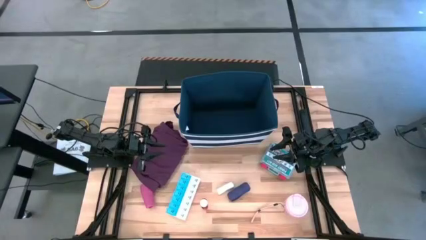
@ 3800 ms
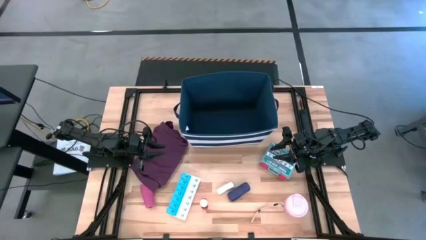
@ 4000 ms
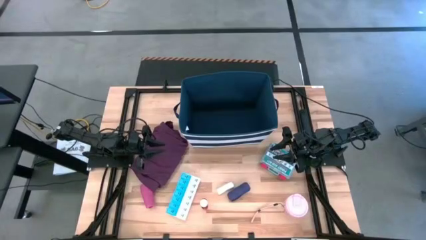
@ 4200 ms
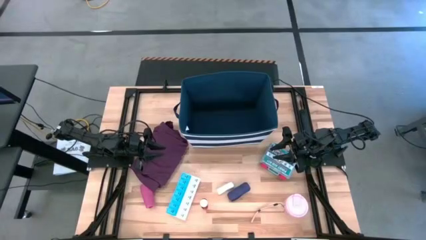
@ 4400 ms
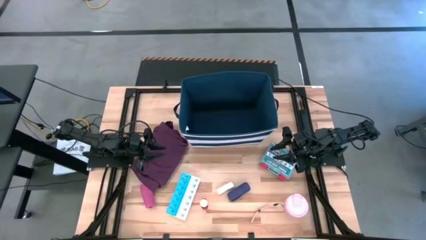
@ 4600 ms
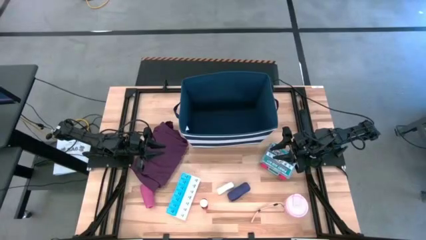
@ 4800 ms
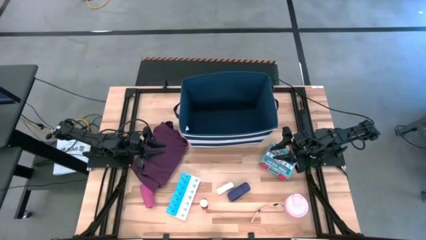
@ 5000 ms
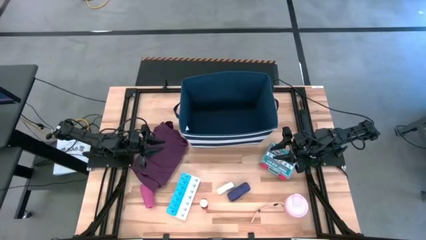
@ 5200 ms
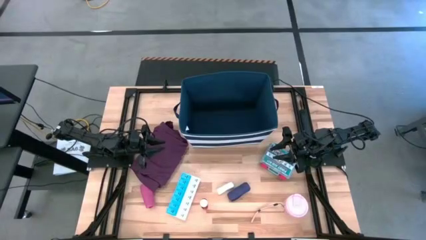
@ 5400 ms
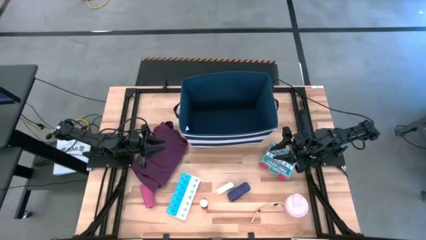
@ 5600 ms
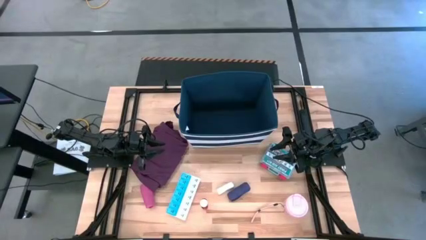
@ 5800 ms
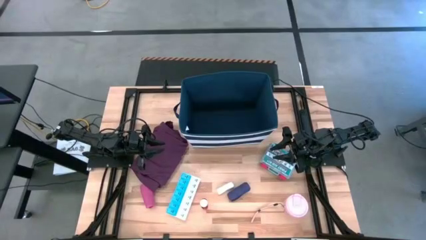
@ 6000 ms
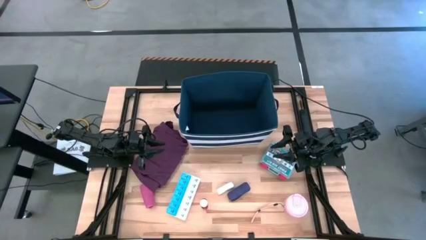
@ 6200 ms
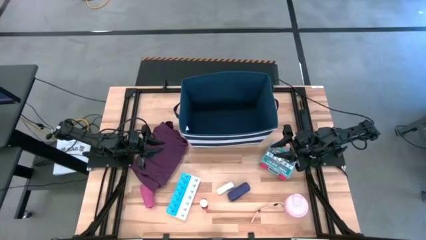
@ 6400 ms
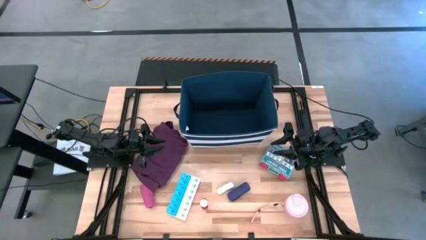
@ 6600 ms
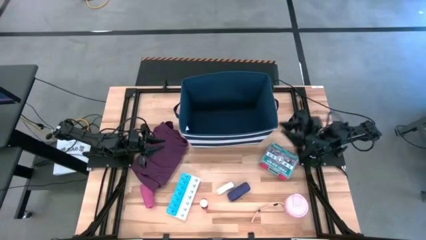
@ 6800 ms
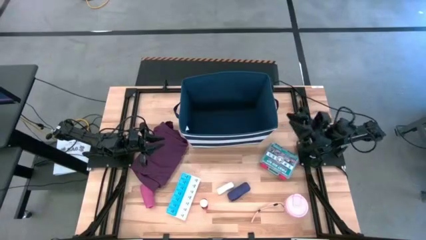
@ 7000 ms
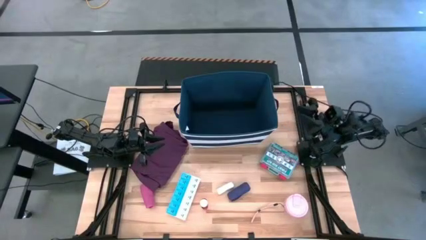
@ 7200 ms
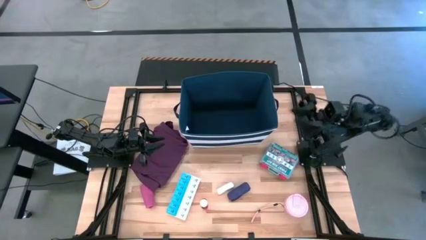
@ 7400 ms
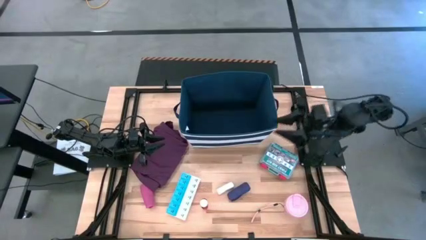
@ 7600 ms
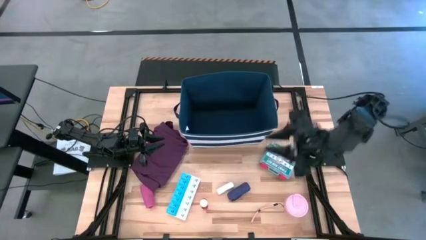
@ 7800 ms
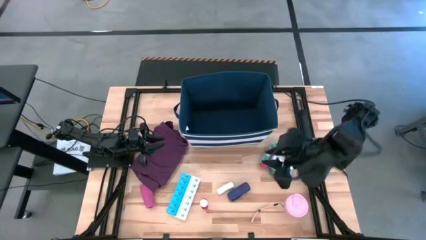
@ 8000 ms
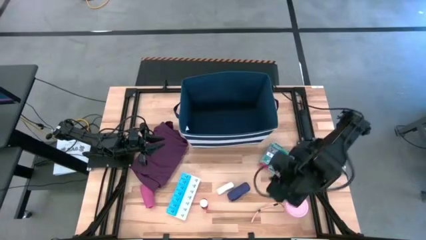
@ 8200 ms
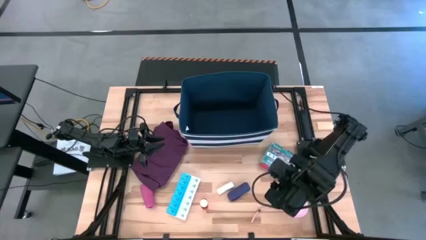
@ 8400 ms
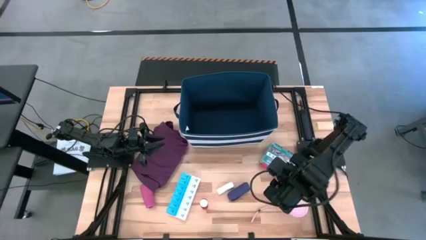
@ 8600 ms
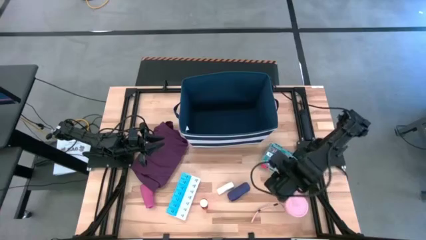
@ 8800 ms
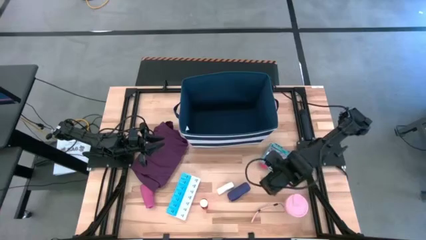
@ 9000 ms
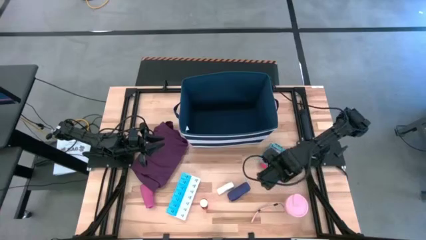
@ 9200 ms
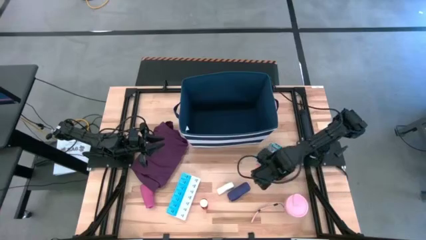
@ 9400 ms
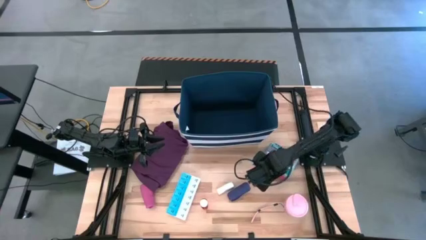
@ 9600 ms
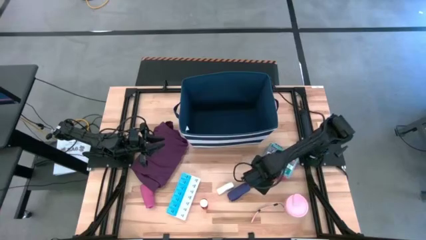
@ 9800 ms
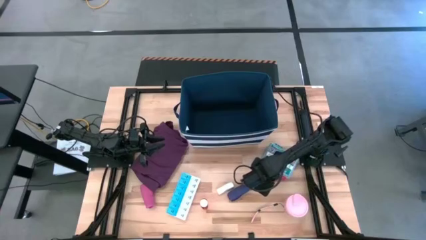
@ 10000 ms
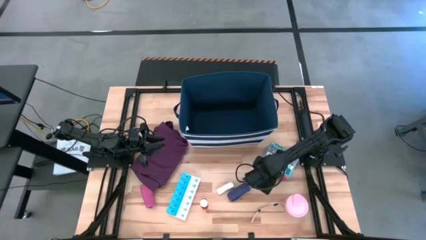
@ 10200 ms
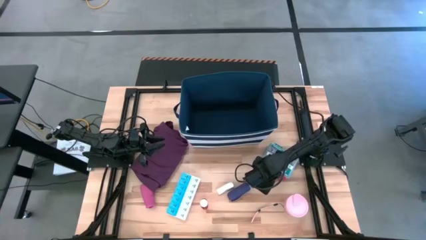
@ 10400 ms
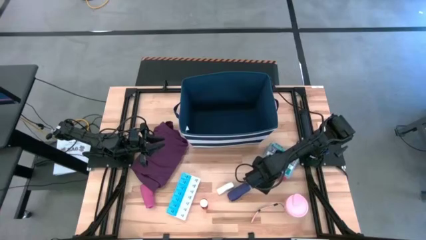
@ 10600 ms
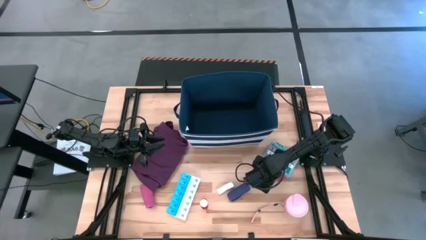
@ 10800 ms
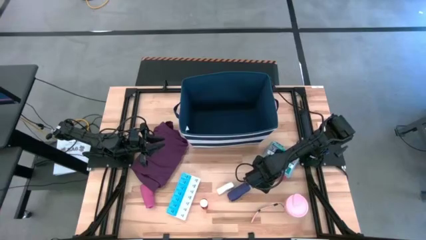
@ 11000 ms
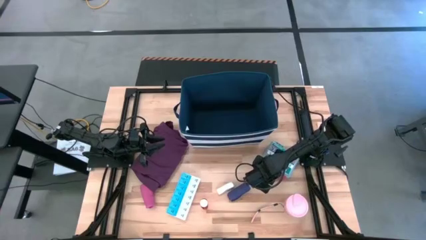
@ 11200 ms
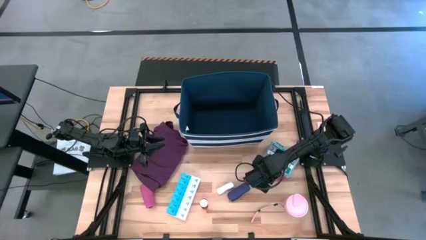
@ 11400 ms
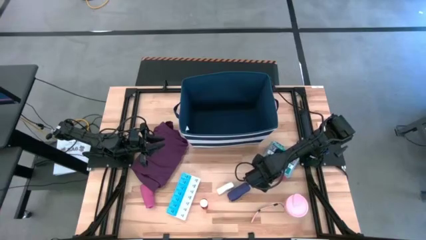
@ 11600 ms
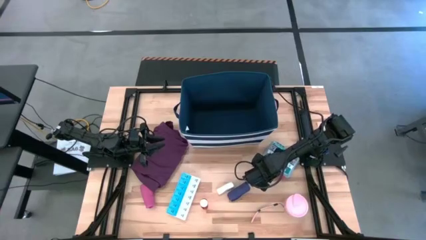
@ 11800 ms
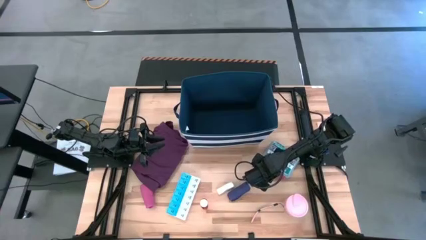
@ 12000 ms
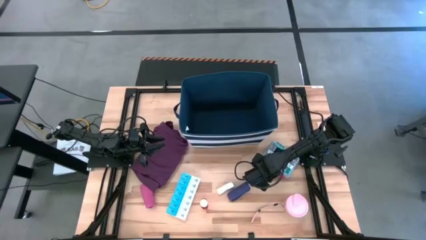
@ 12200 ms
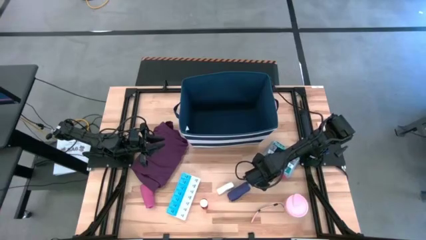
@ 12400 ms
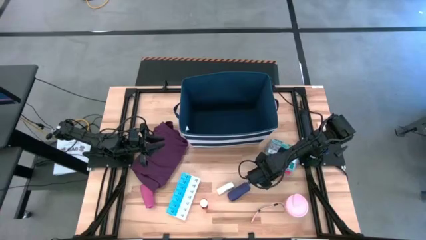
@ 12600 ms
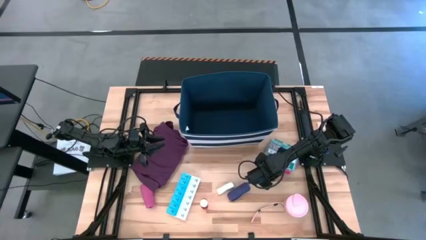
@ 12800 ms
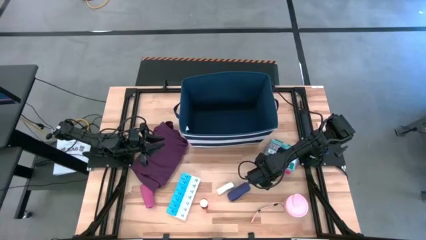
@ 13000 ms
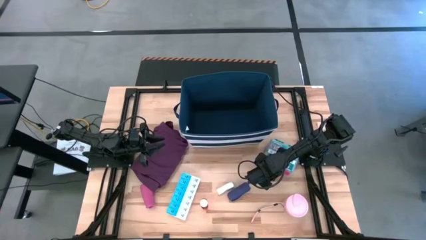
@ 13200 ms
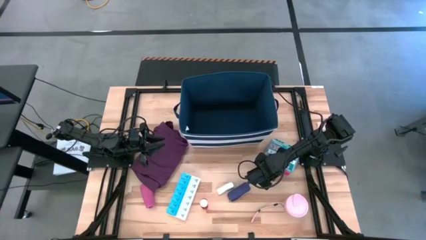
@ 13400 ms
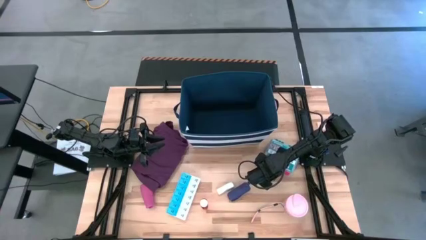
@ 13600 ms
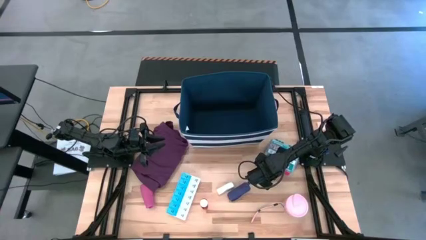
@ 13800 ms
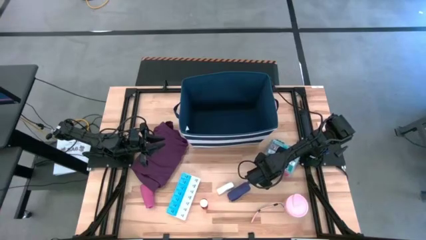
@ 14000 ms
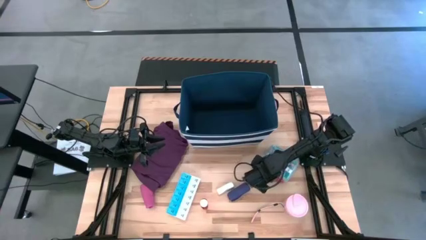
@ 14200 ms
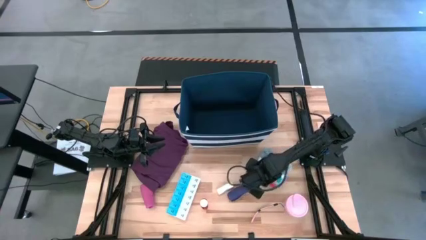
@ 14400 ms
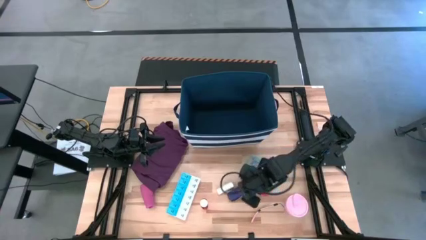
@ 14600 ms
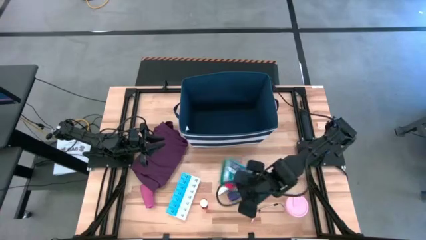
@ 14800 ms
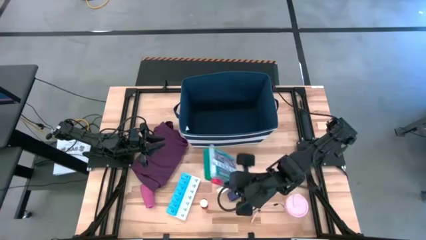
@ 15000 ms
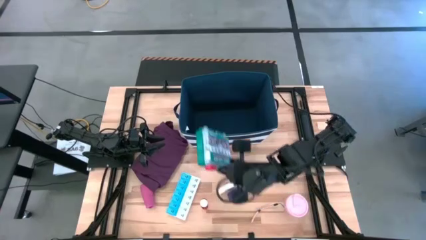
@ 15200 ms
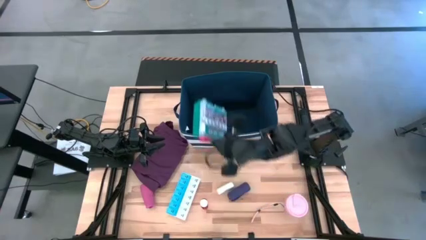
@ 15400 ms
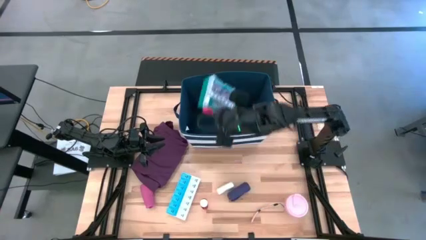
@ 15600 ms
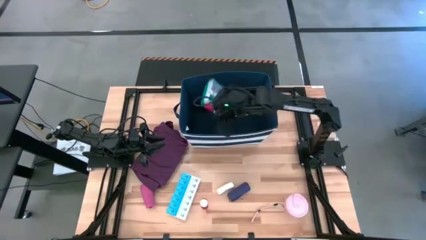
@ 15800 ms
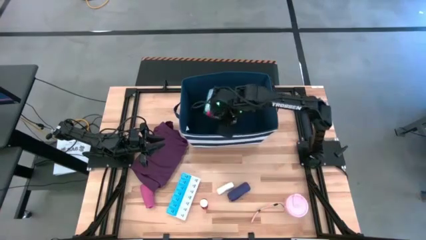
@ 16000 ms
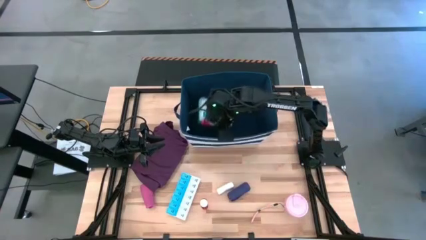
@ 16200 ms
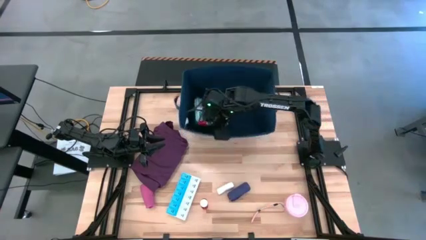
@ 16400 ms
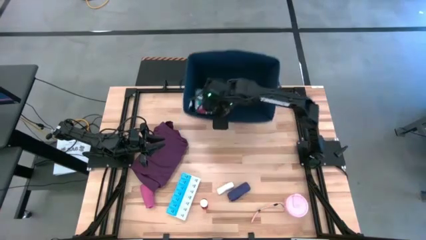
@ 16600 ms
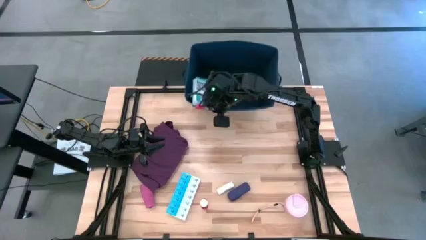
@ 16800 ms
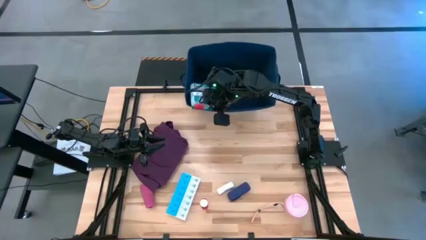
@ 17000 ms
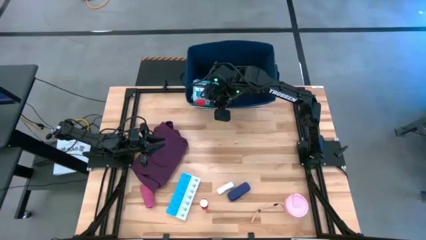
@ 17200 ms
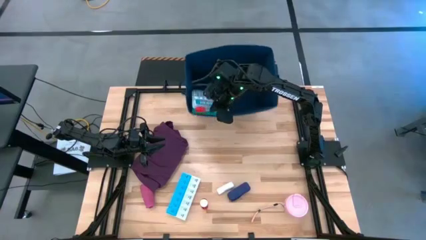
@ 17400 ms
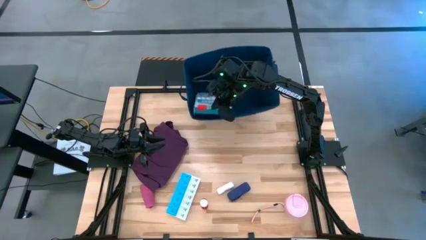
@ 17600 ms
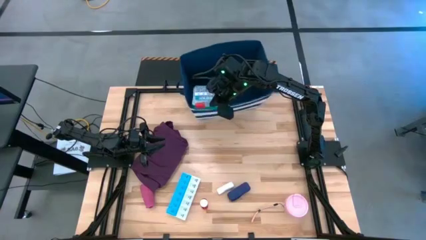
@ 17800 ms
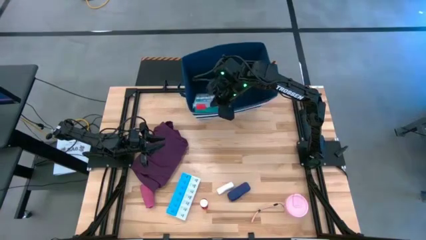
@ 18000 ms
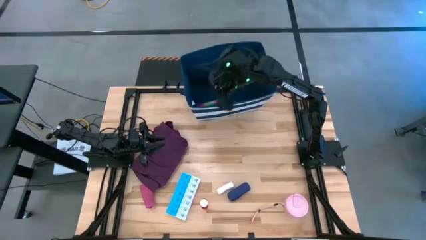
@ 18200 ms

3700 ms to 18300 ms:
Task: Pick & place medical supplies in basket/bin
Put the transparent first aid kit into the blue bin

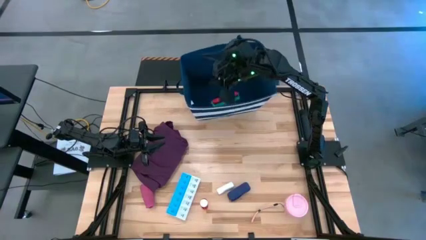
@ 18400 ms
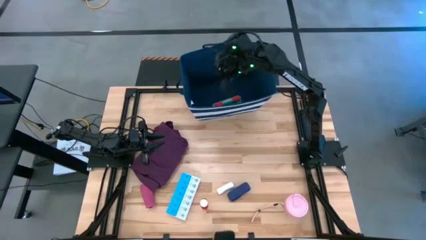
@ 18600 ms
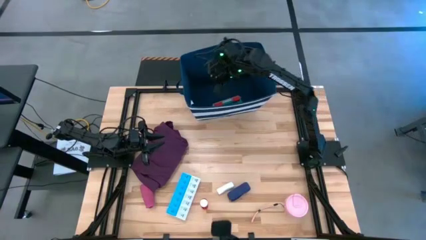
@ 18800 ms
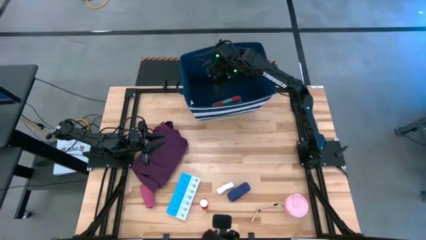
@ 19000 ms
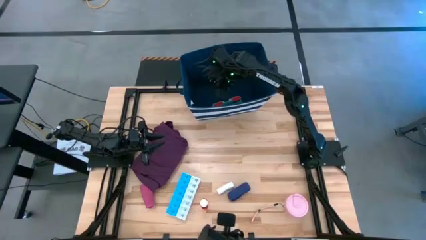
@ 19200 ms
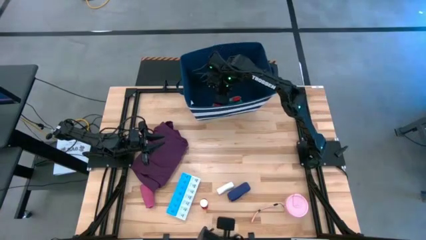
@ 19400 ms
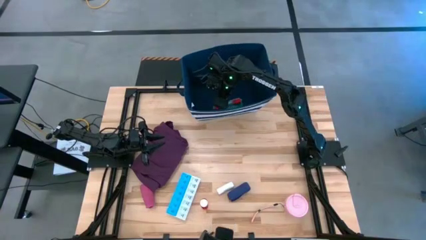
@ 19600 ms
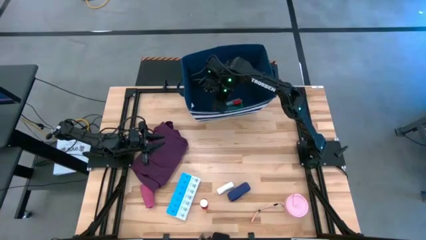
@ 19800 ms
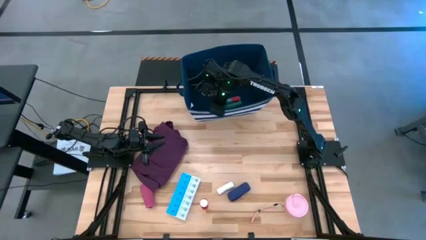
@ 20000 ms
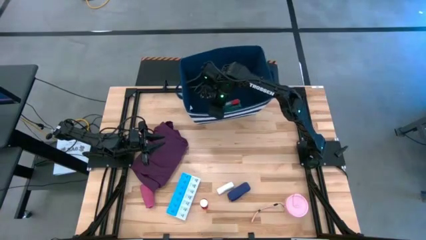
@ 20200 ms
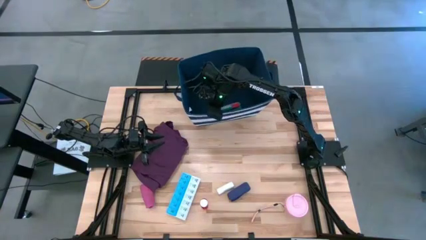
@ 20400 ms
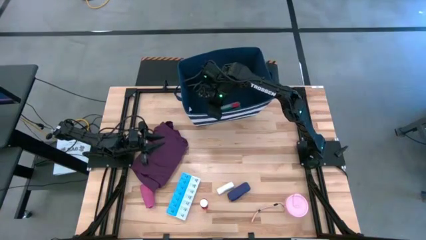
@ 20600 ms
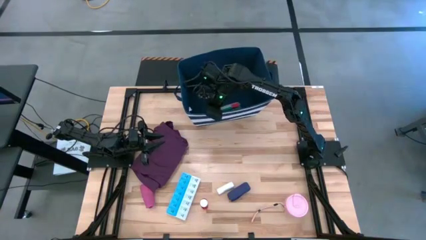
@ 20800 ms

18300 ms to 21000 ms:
Adjust the blue bin on the table
